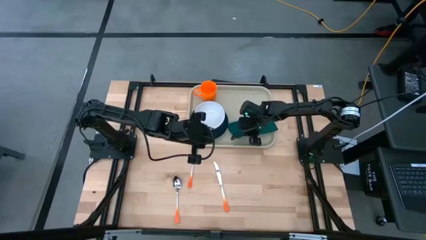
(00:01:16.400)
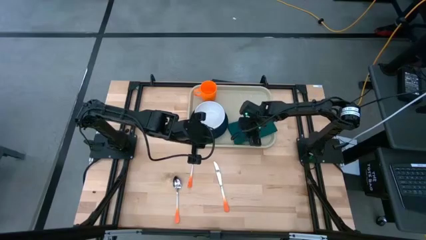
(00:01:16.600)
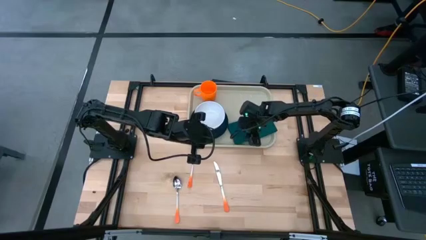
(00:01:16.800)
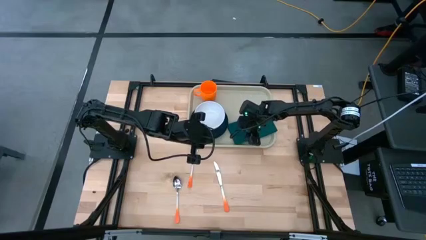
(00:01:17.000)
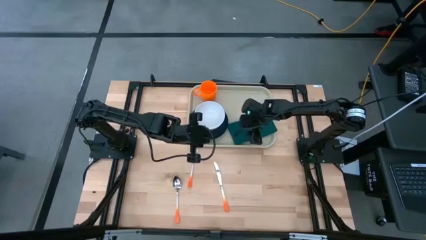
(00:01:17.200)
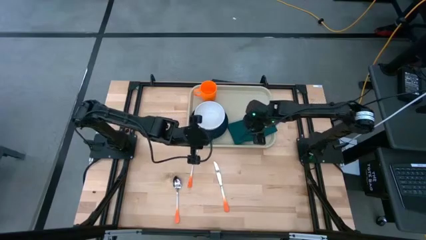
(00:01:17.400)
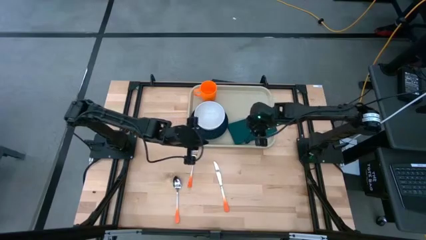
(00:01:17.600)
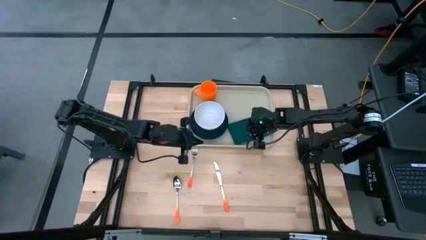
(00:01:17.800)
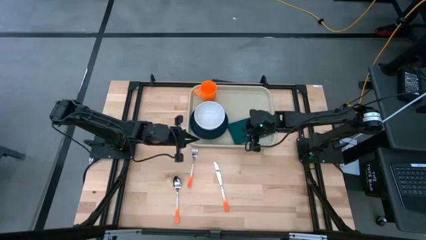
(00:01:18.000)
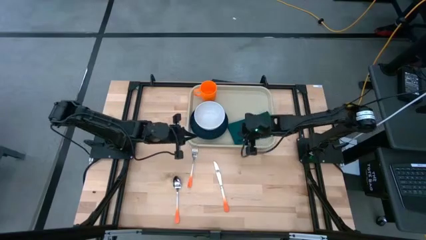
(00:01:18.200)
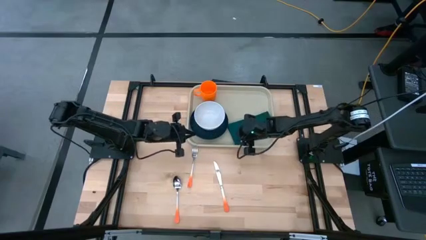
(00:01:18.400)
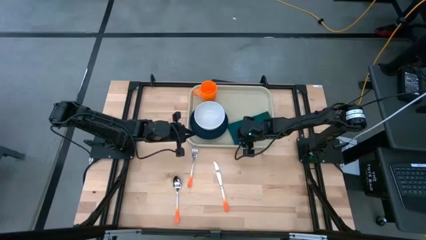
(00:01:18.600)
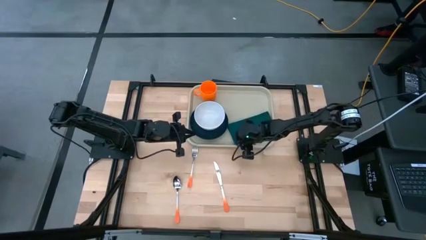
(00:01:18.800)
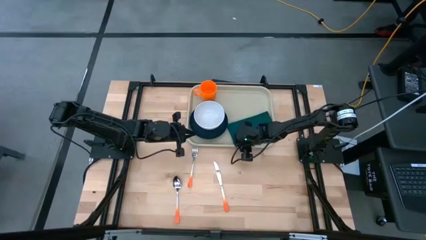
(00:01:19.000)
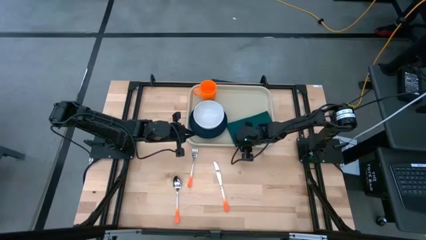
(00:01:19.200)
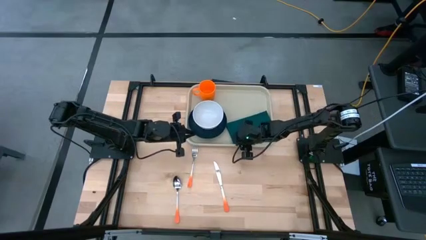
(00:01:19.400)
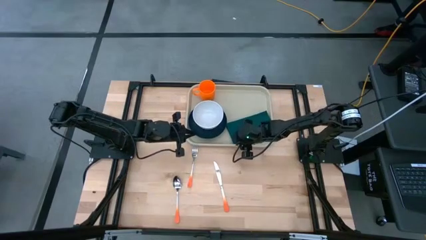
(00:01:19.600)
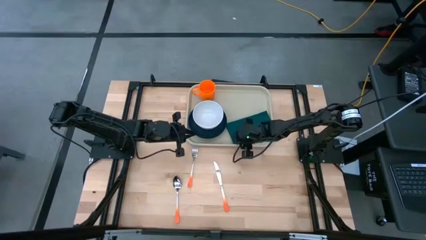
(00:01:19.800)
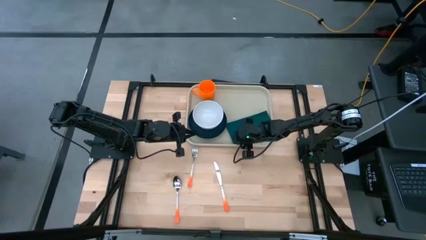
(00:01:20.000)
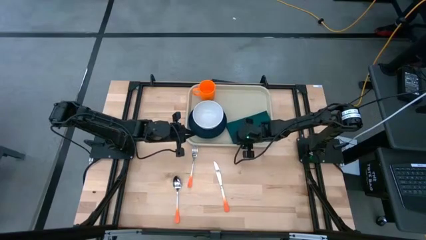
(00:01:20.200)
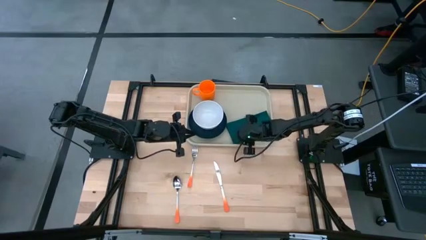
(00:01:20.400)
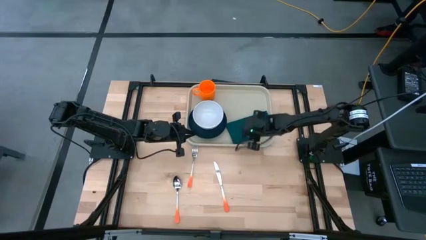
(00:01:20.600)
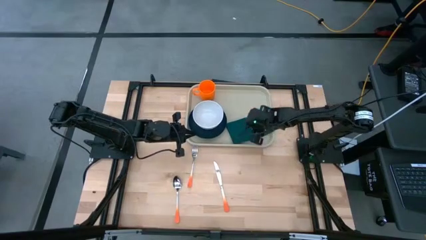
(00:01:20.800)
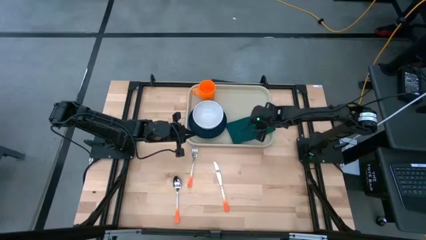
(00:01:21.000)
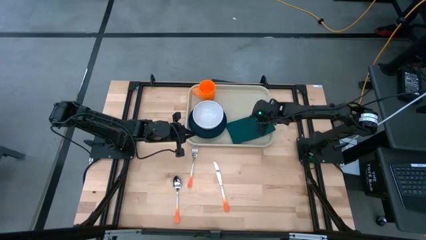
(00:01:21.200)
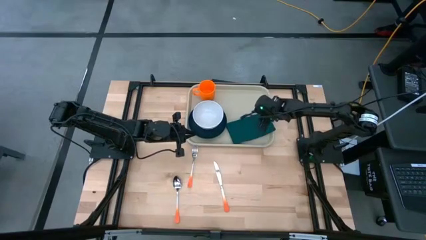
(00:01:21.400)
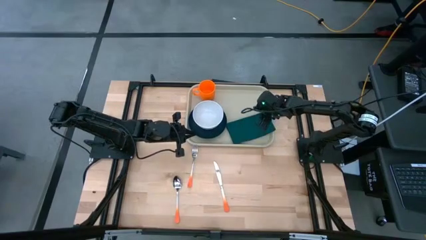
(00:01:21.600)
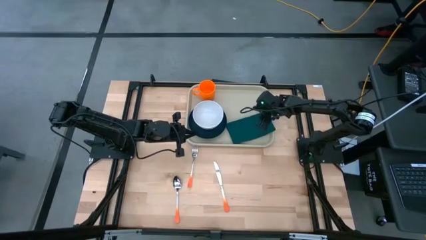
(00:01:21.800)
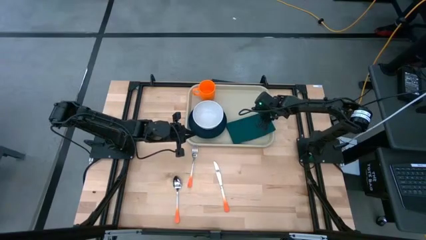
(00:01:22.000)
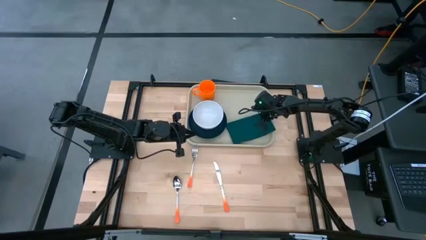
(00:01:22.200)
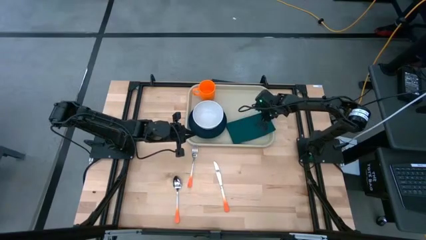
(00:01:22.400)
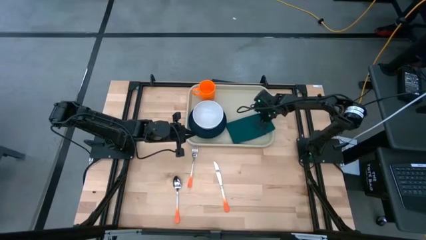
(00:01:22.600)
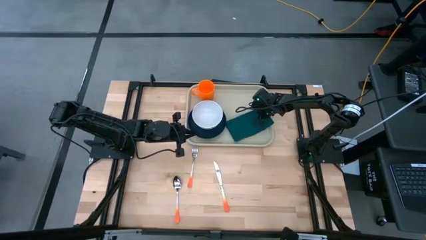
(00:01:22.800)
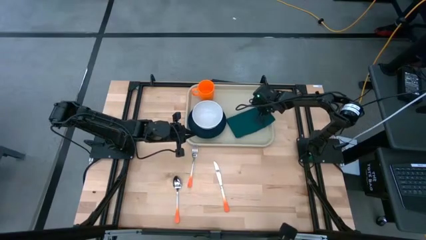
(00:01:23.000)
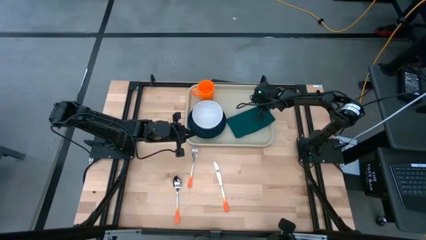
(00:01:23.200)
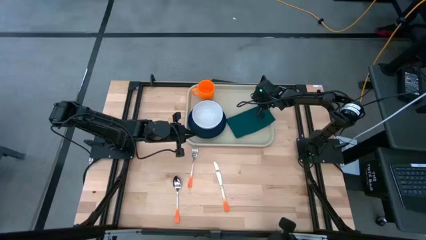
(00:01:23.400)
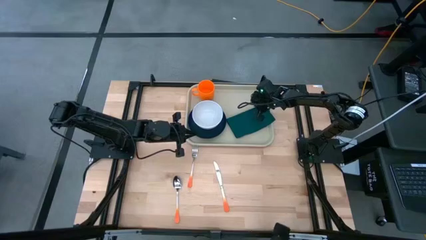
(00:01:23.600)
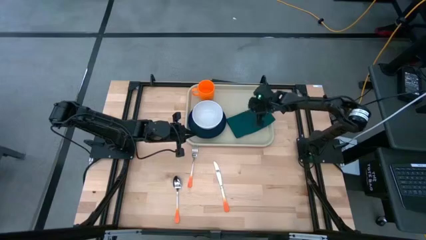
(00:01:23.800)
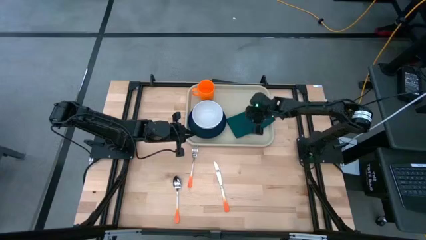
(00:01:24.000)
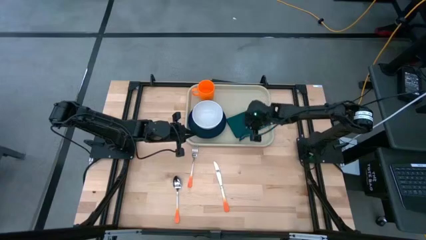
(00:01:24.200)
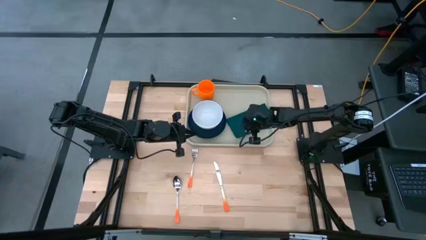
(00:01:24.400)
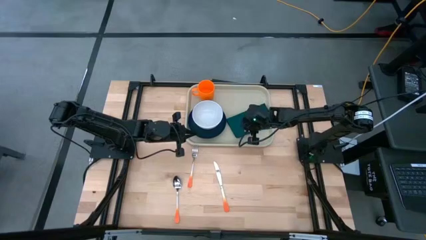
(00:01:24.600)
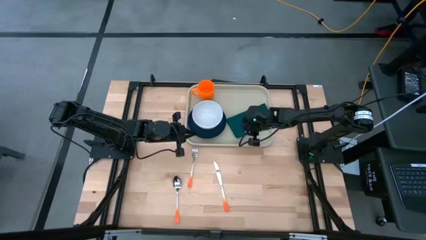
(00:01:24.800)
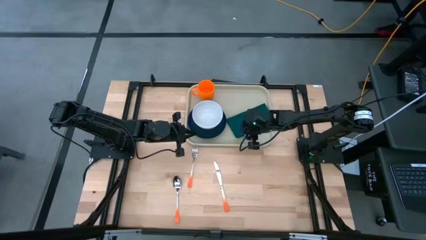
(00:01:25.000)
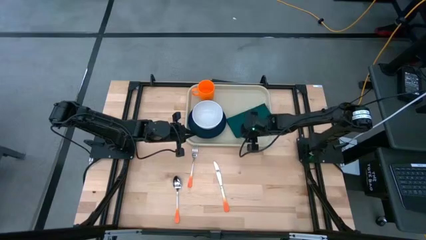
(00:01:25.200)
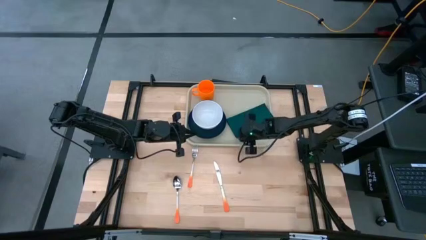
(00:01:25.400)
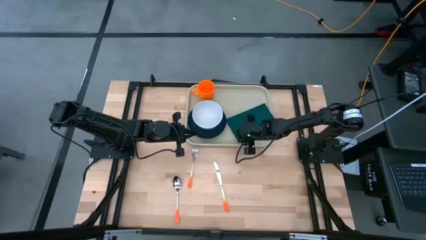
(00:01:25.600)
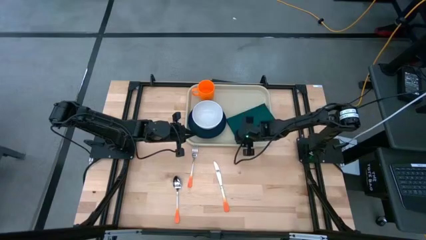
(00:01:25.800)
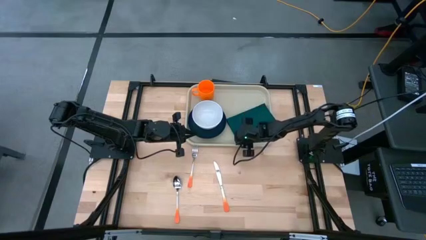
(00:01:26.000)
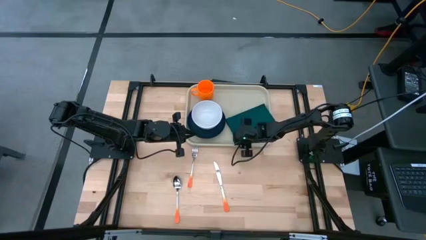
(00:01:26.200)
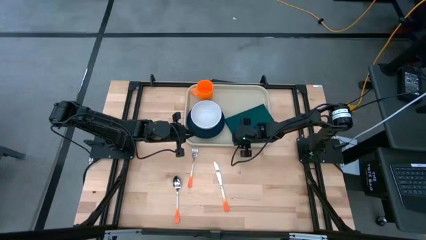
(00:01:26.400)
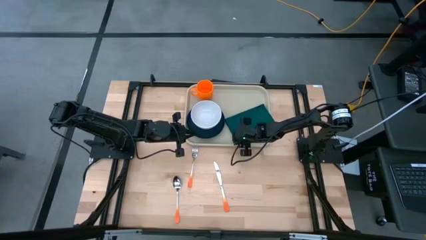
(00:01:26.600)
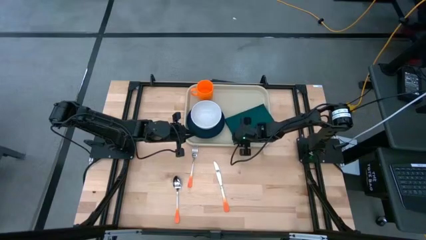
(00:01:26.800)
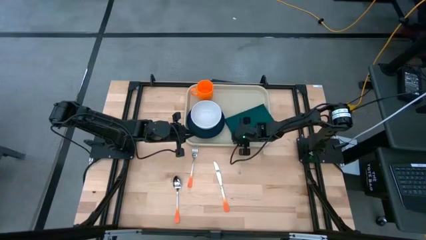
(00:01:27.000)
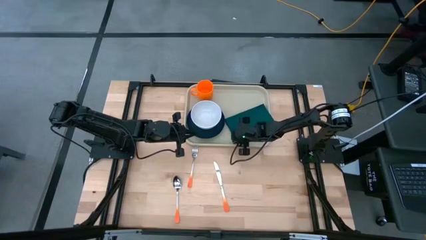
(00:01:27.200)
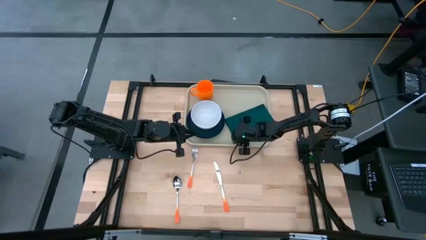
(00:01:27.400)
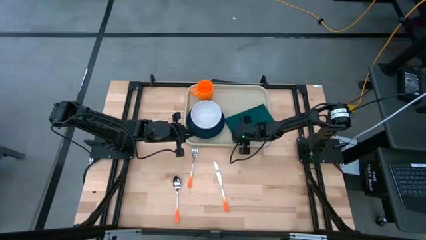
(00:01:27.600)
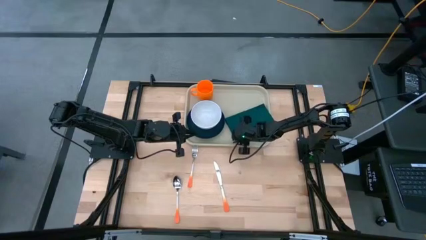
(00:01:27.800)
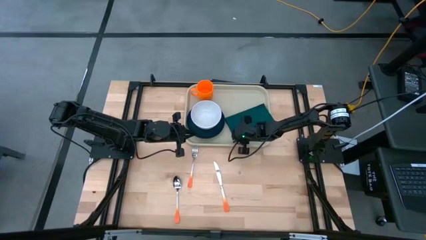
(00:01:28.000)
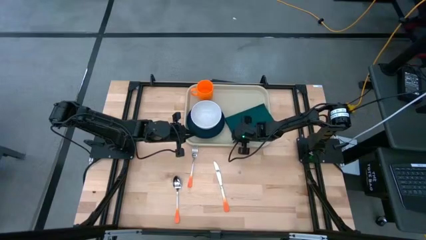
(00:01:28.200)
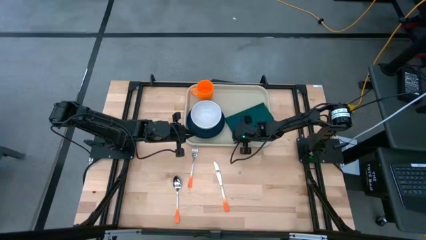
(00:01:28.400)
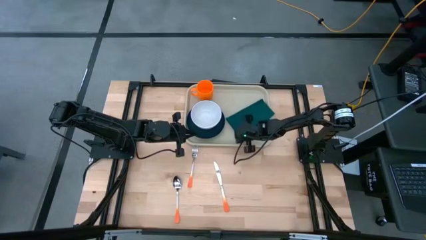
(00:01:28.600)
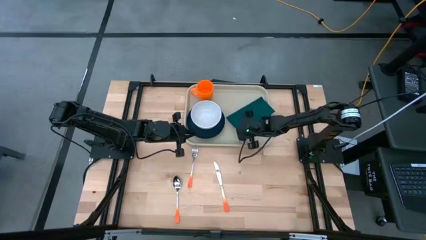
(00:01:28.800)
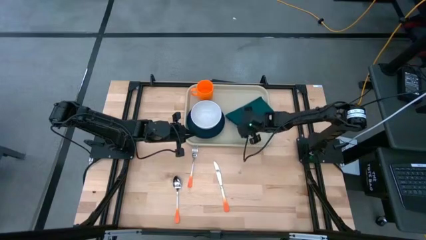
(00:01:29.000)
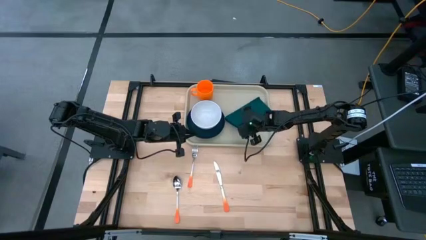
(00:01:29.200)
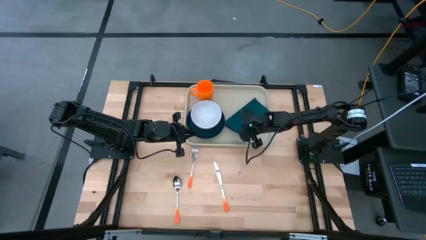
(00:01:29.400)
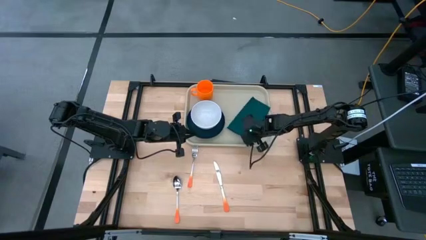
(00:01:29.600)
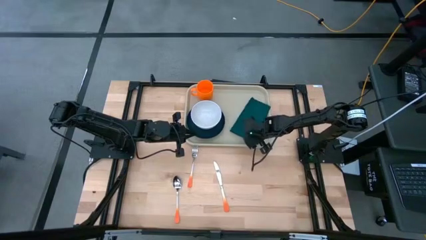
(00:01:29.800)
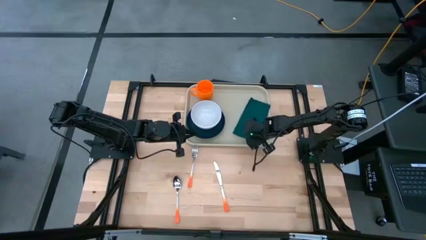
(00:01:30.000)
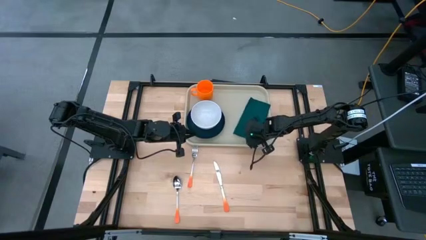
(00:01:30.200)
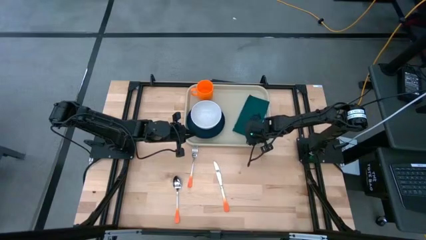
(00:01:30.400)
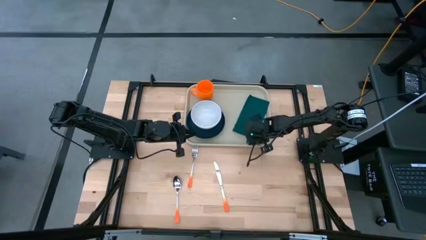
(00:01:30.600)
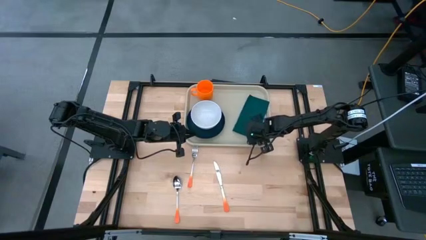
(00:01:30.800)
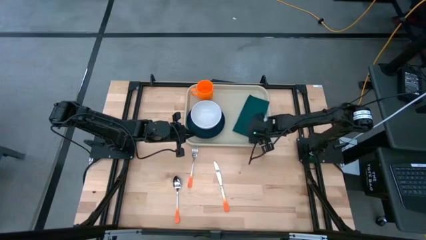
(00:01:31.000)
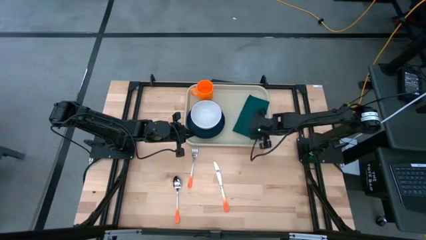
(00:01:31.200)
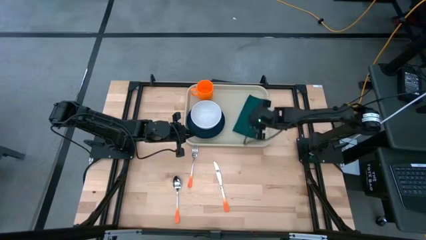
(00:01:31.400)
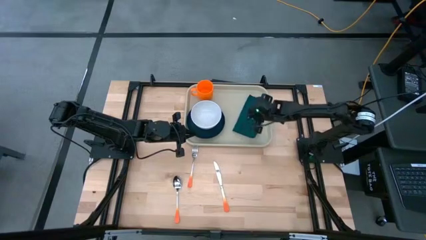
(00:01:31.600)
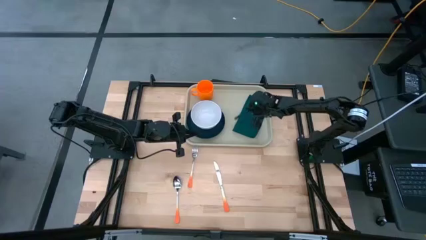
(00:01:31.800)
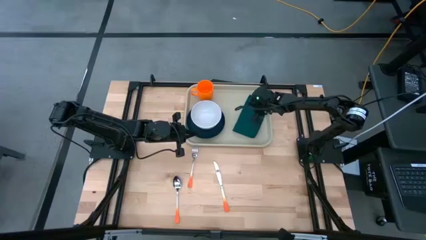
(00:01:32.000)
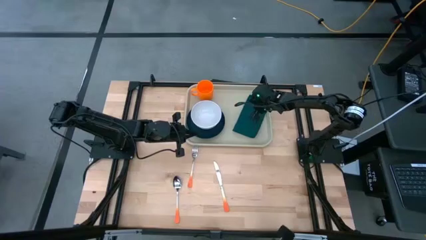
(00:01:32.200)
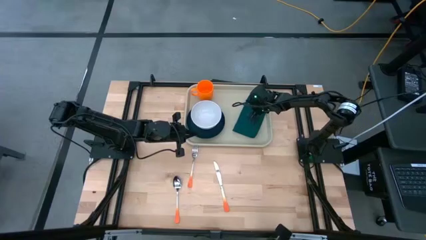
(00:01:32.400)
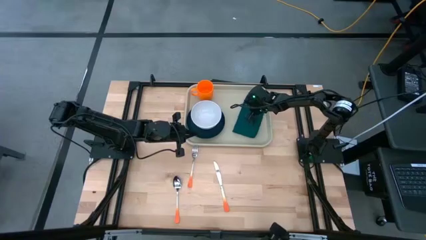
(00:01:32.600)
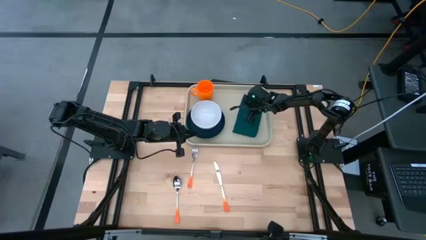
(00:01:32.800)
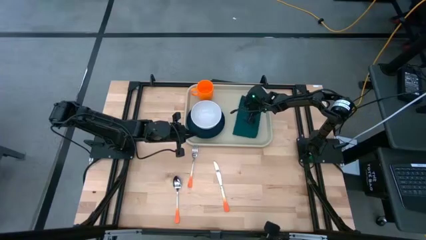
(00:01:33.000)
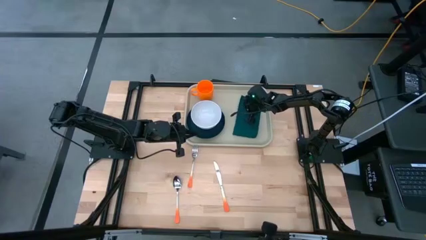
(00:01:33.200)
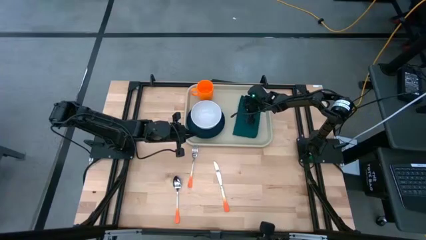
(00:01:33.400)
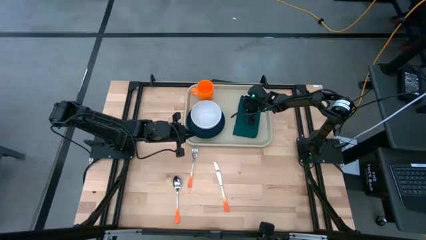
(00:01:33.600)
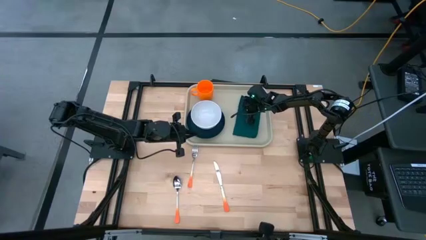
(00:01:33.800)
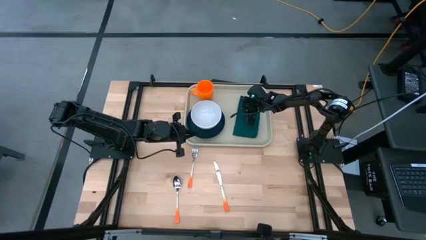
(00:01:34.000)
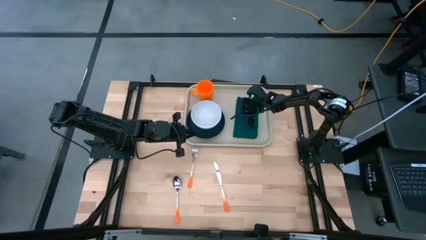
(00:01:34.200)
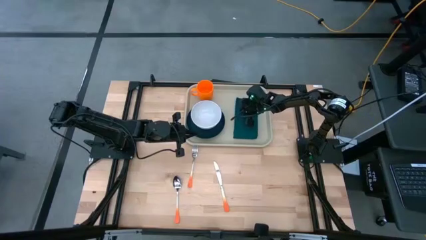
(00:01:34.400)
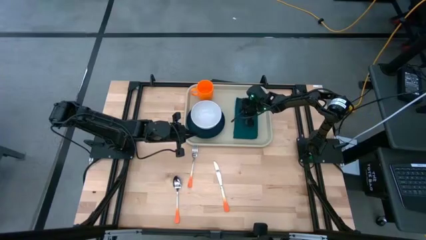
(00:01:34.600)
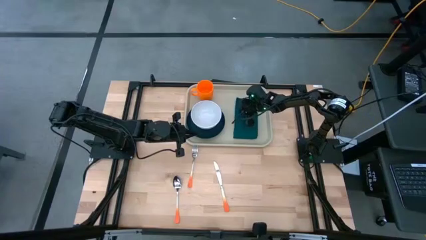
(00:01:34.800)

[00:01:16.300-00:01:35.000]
Task: Set up tray
Put the green napkin to the right of the green plate on the gray serving tray
